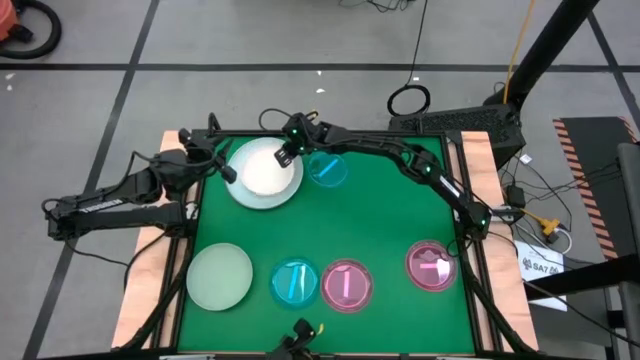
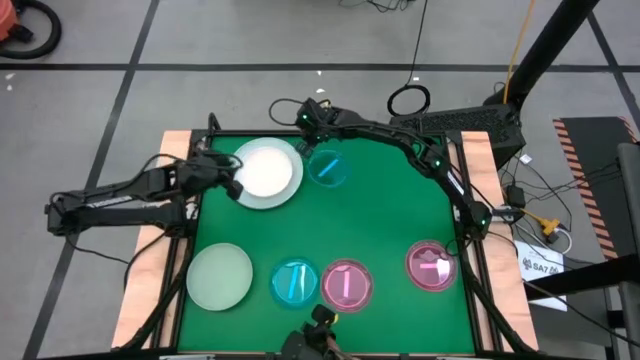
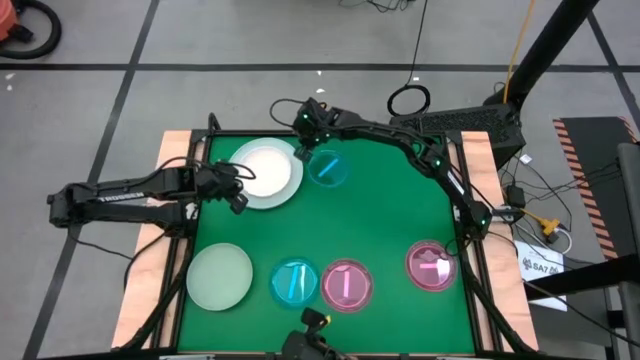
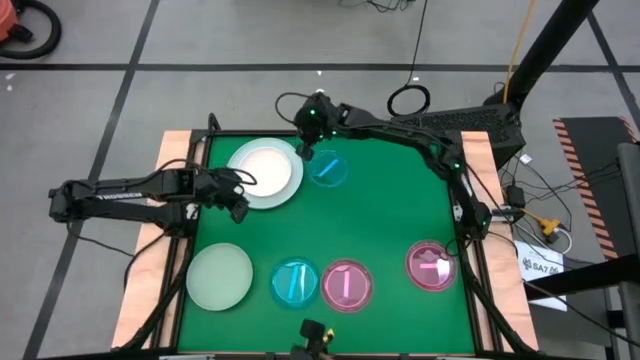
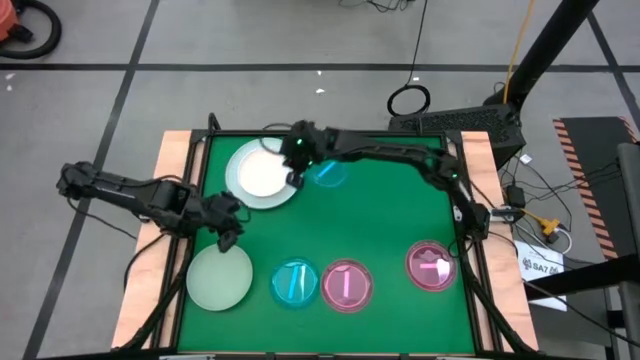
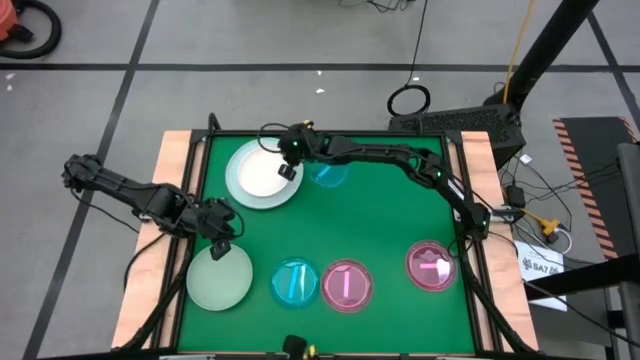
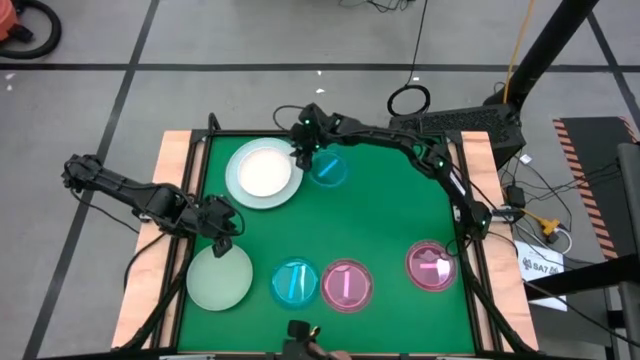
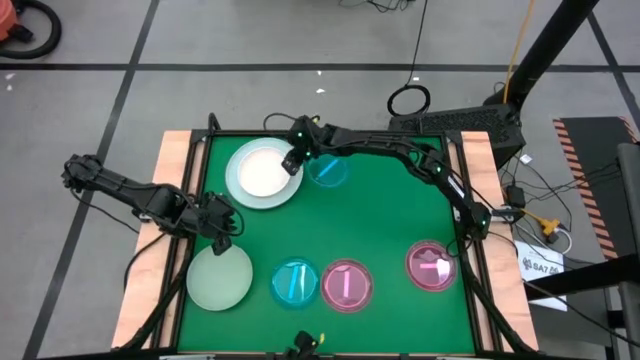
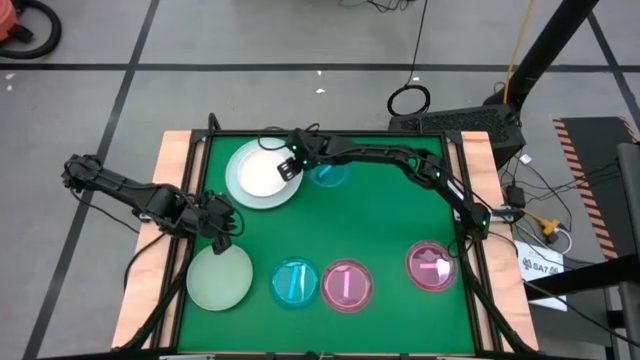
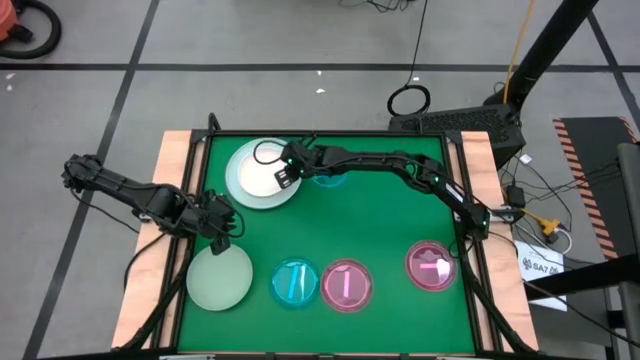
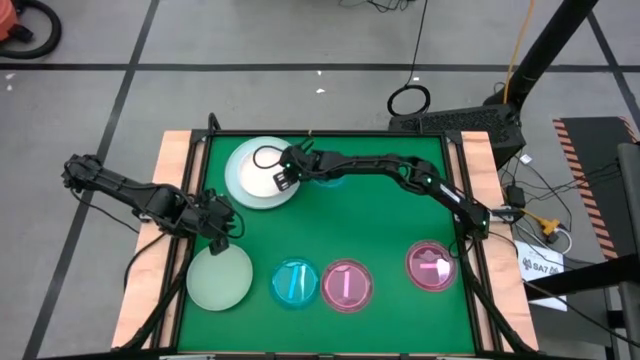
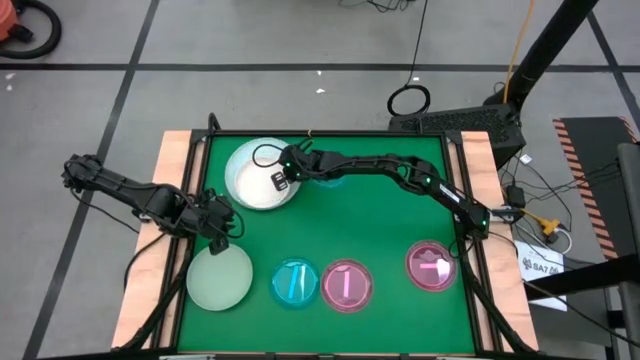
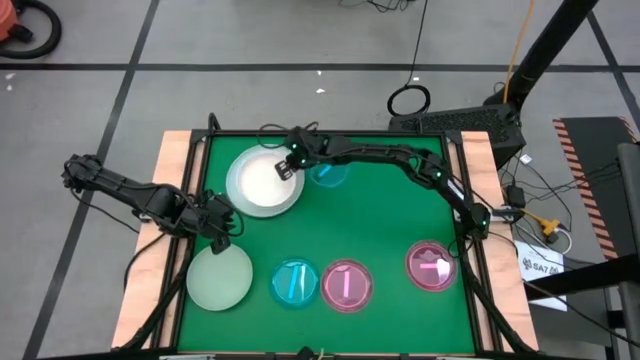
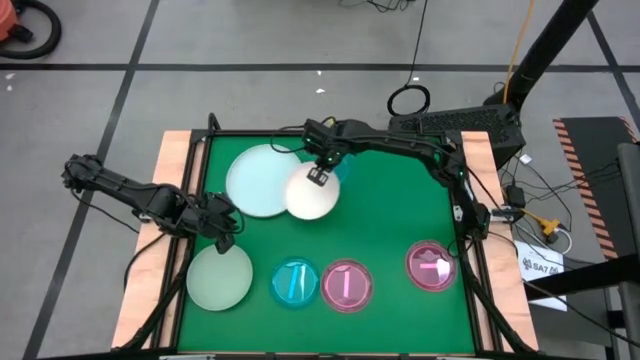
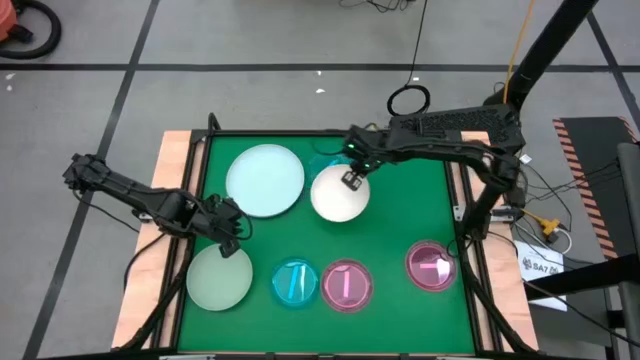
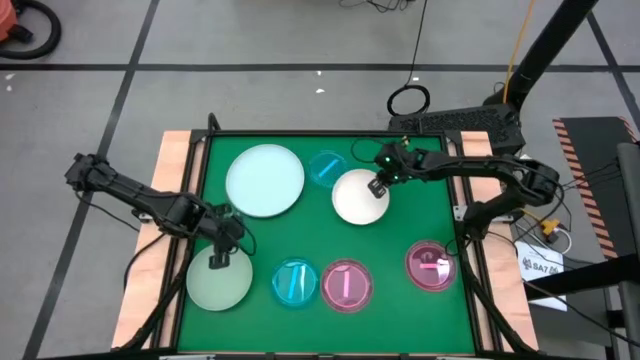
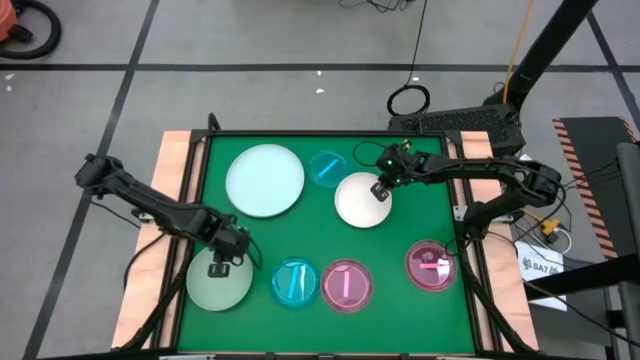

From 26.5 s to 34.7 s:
Task: Stack plastic plates
Remove the white plate from the top of the blue plate

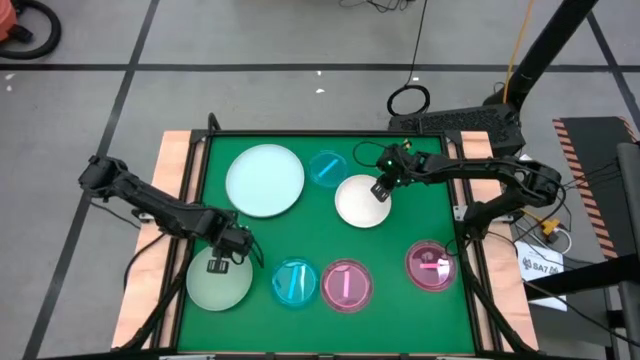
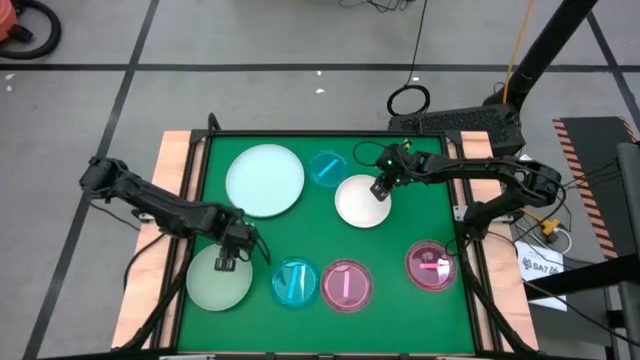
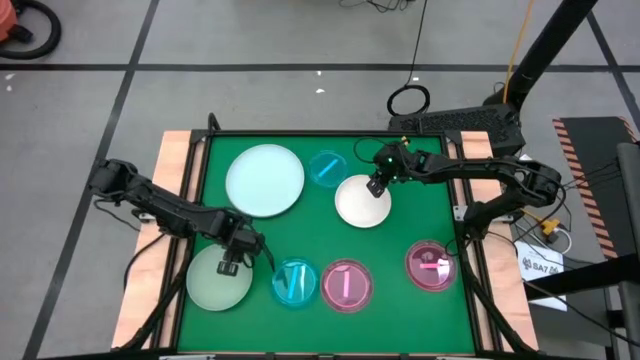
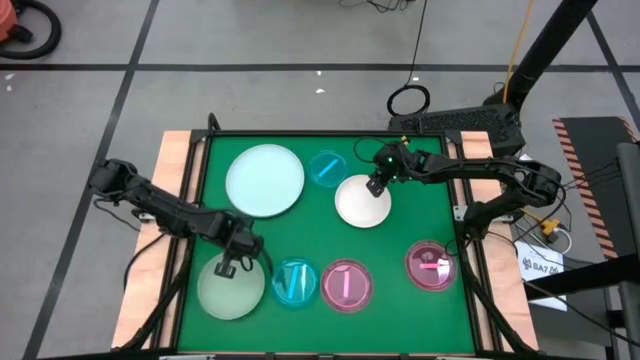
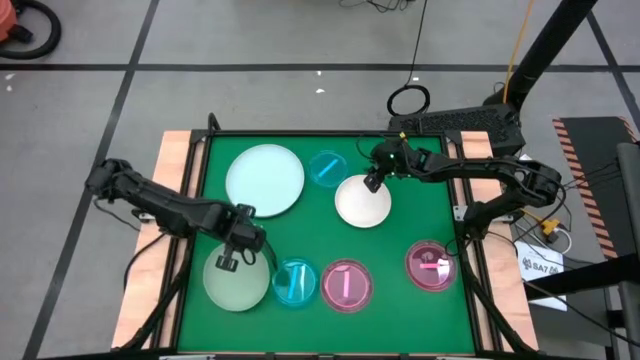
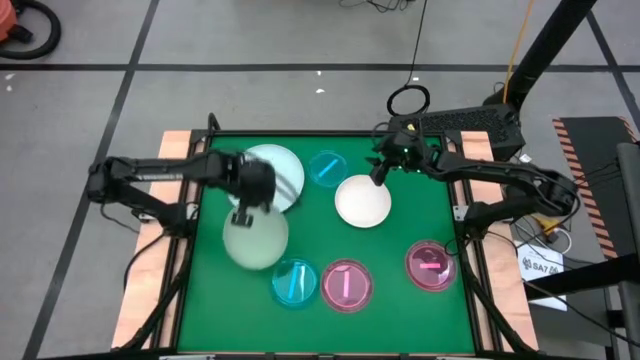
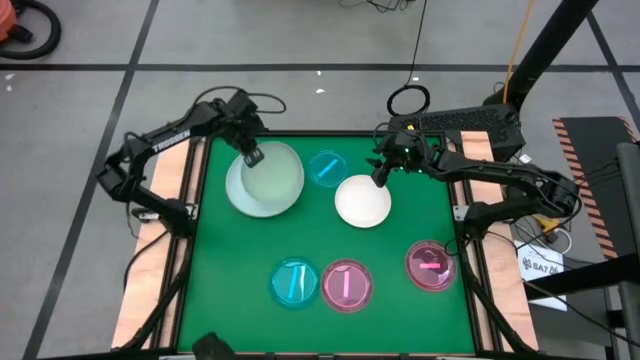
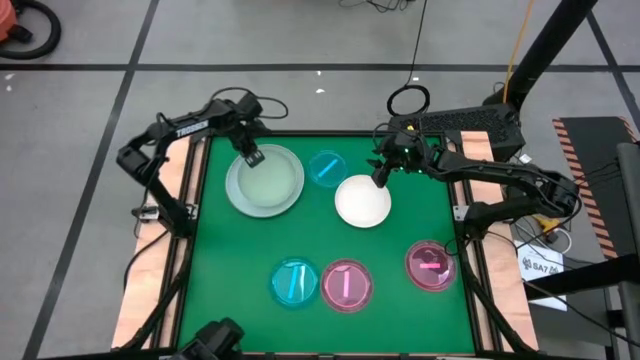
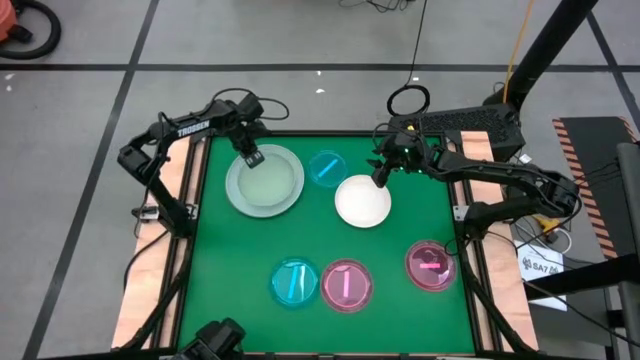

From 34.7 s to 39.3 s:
Stack the green plate on top of the blue plate

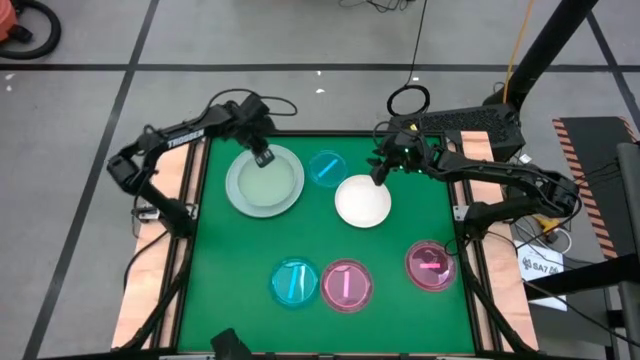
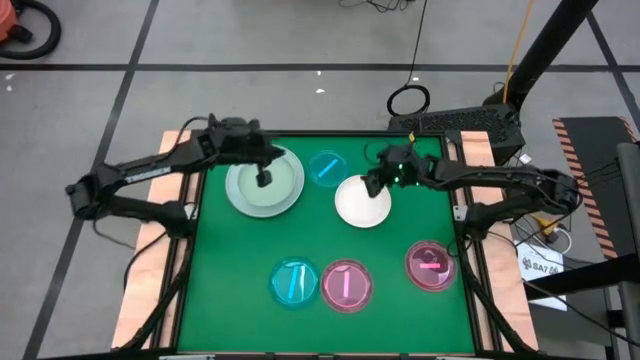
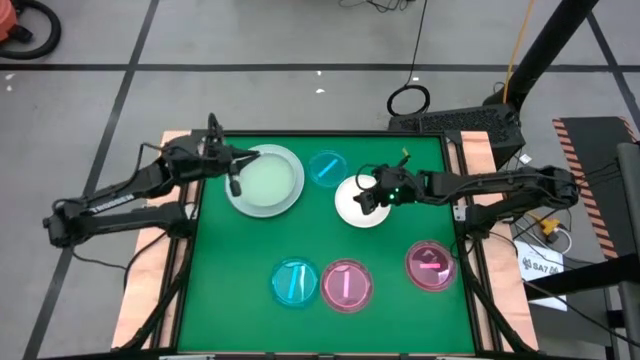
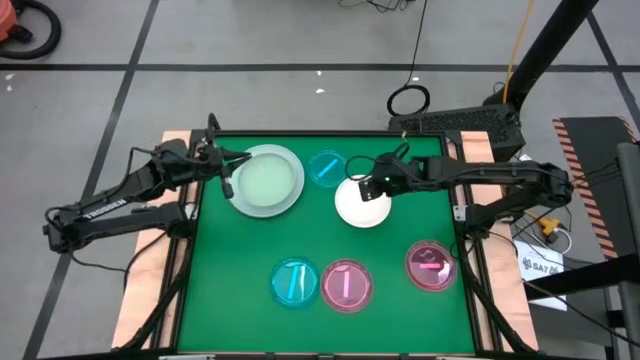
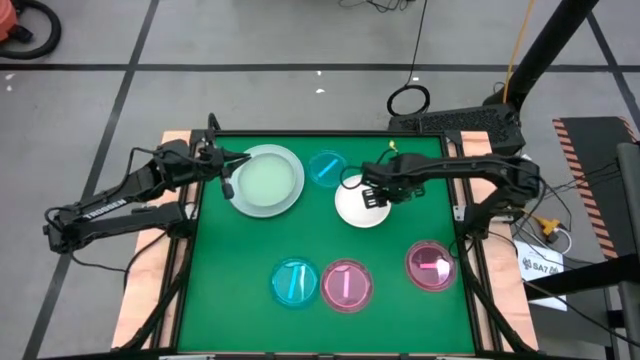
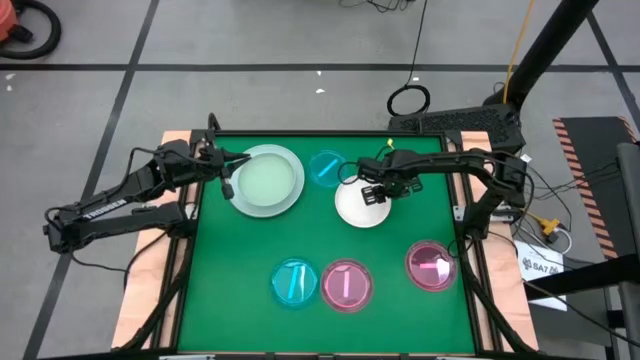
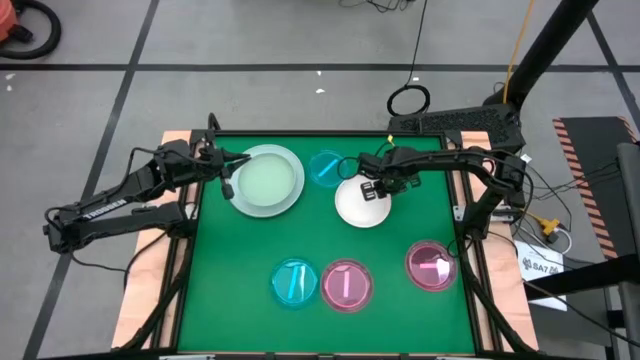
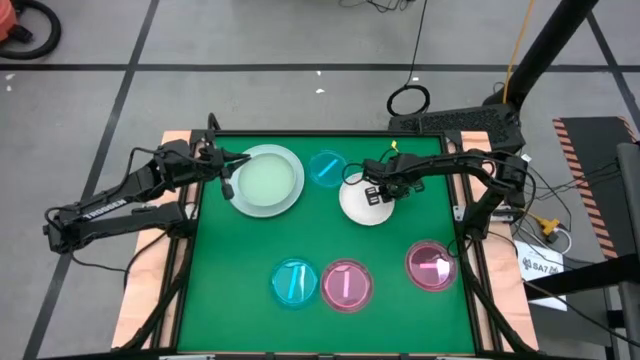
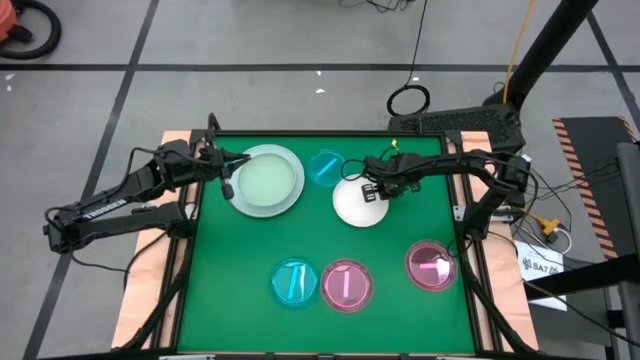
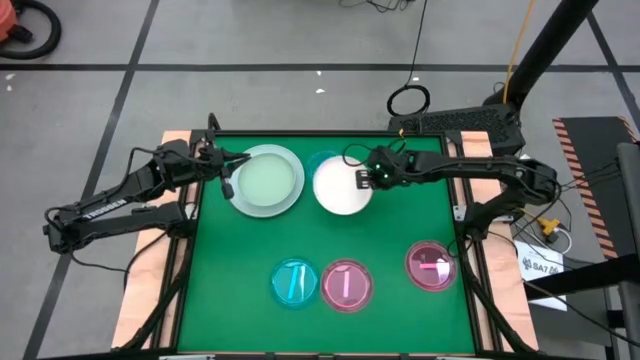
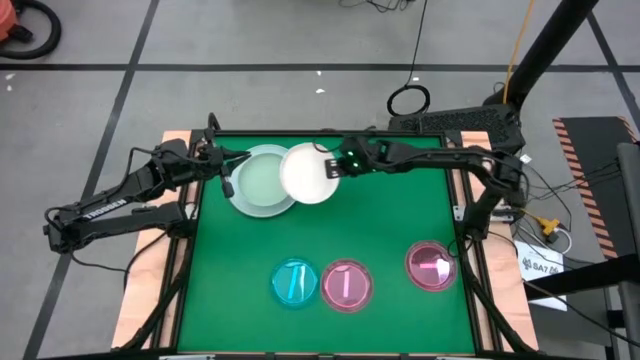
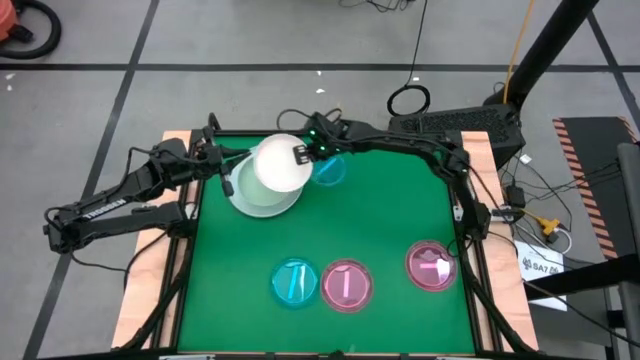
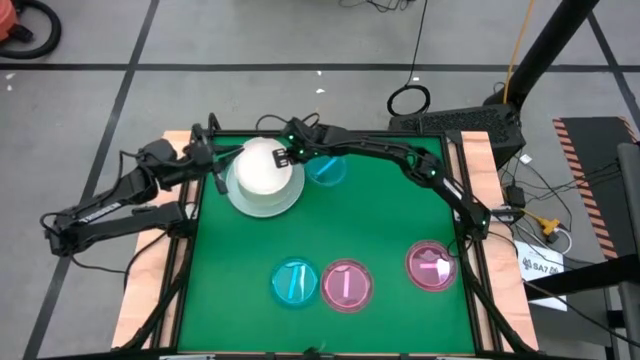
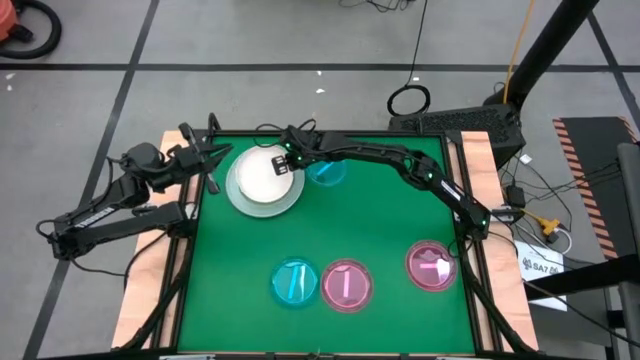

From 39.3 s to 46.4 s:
Stack the white plate on top of the green plate

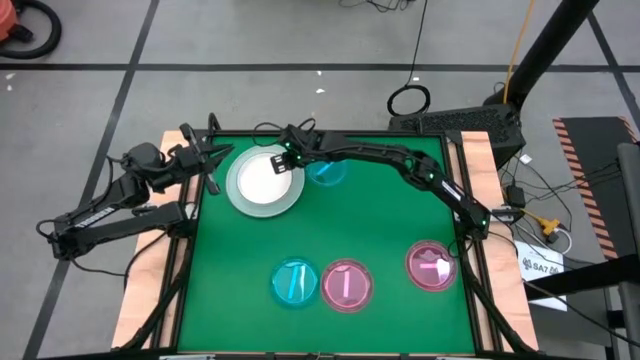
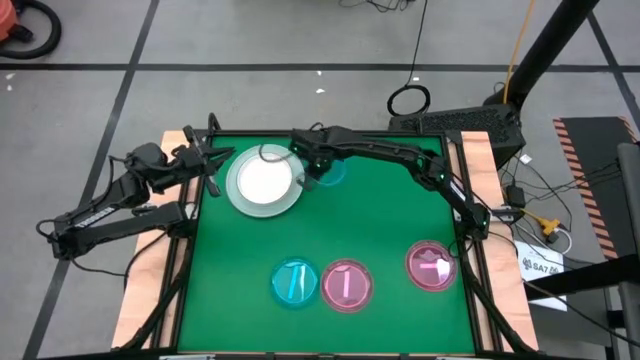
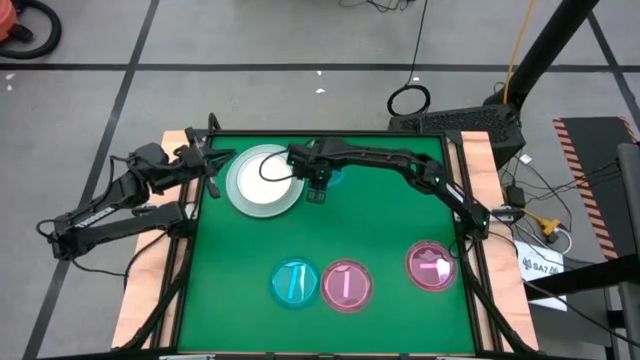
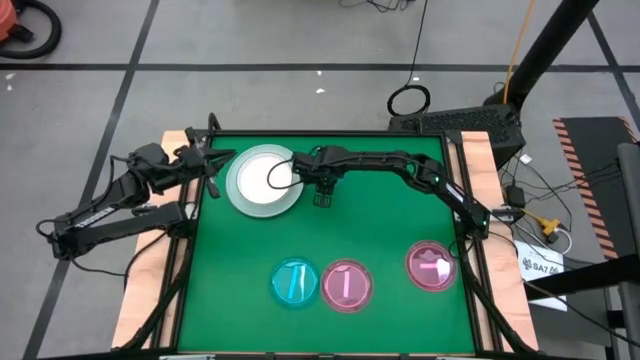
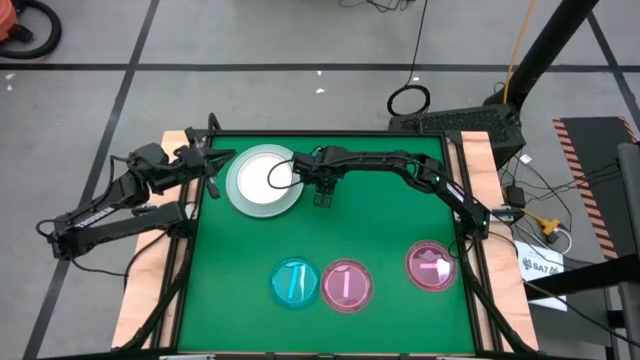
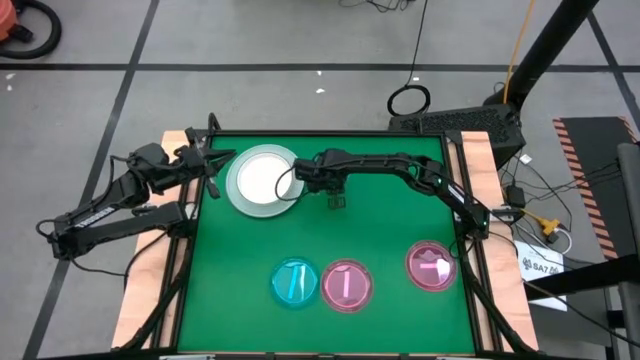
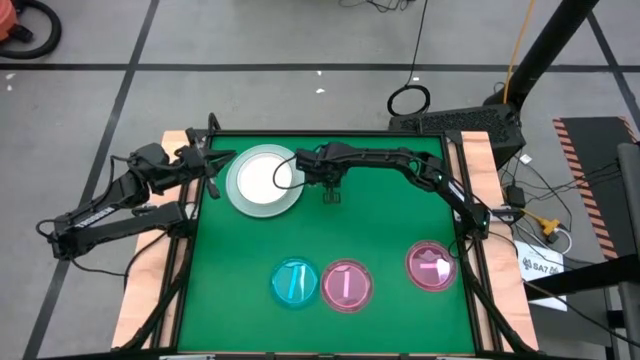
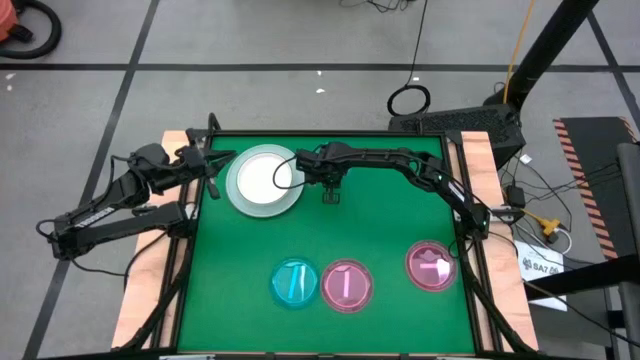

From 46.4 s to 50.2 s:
Stack the top blue plate on top of the white plate
